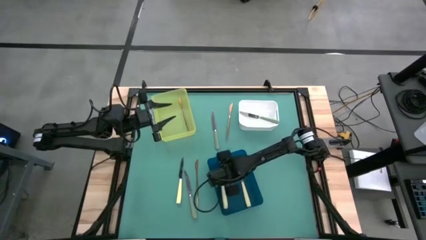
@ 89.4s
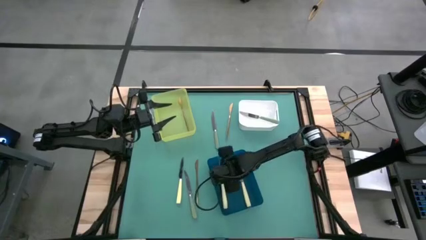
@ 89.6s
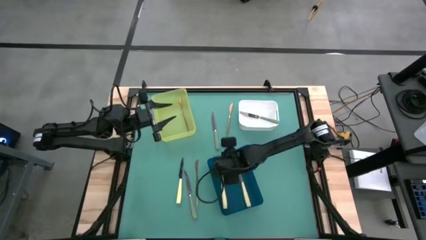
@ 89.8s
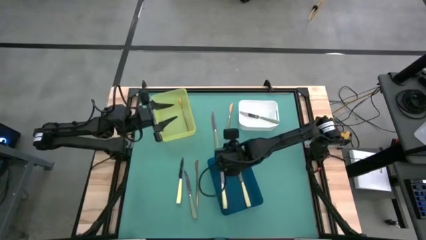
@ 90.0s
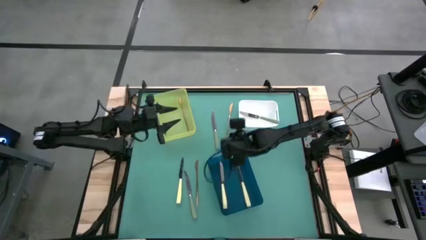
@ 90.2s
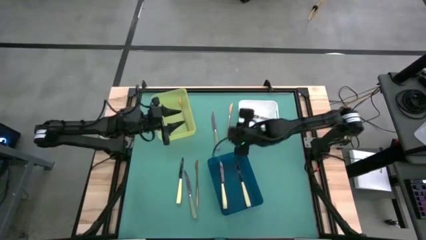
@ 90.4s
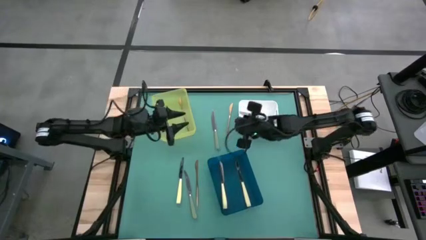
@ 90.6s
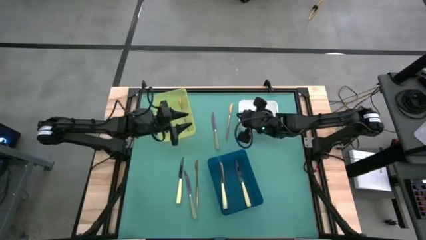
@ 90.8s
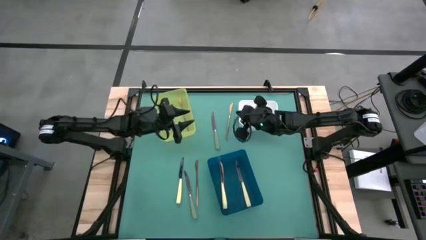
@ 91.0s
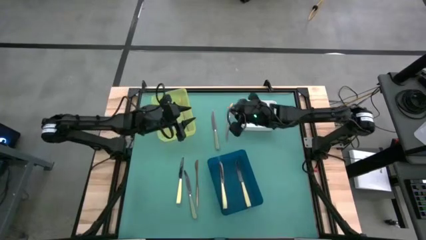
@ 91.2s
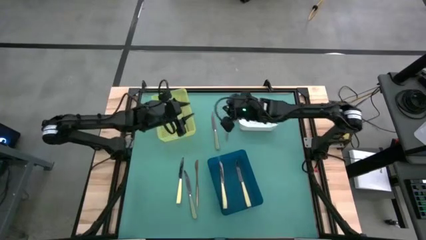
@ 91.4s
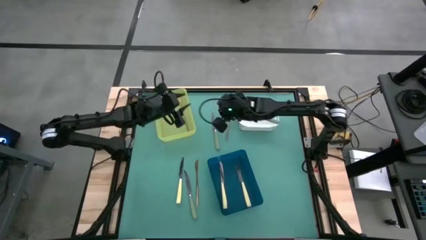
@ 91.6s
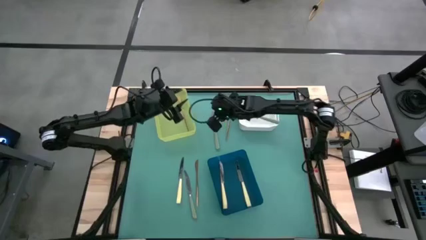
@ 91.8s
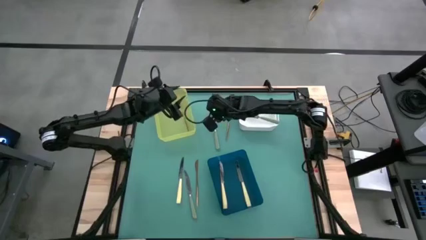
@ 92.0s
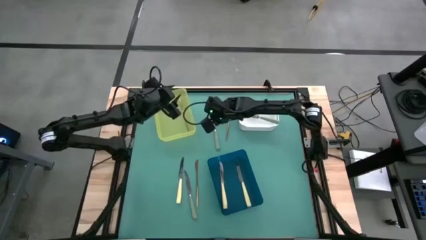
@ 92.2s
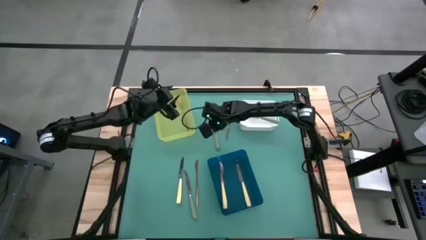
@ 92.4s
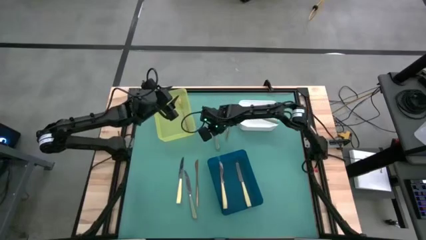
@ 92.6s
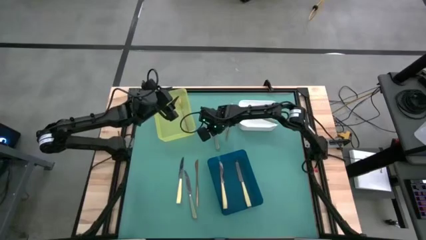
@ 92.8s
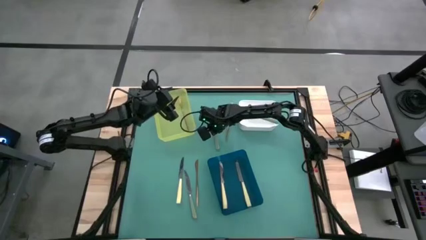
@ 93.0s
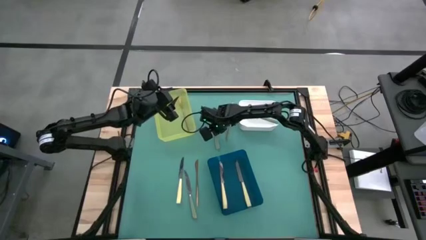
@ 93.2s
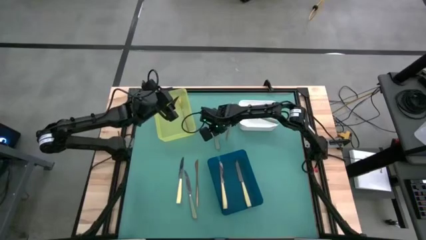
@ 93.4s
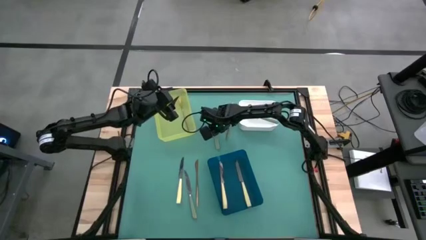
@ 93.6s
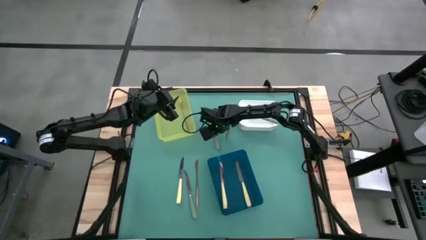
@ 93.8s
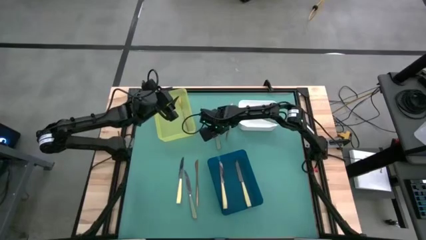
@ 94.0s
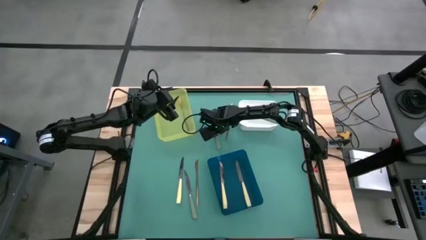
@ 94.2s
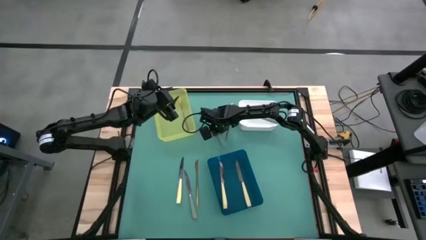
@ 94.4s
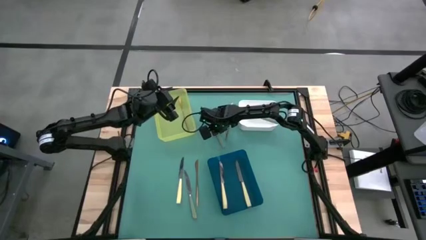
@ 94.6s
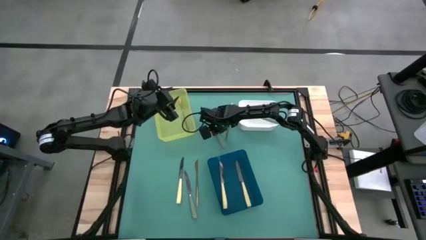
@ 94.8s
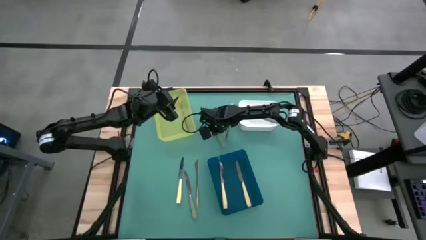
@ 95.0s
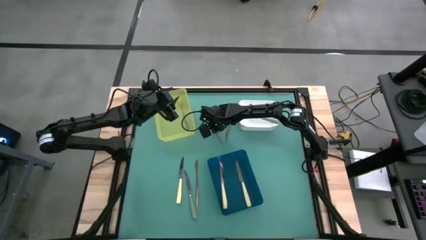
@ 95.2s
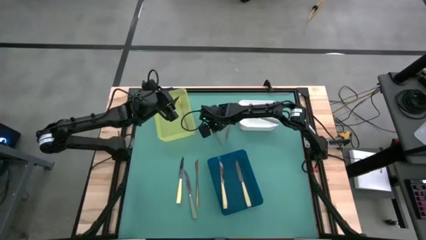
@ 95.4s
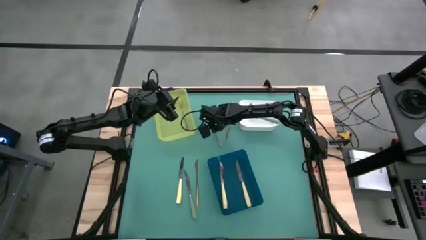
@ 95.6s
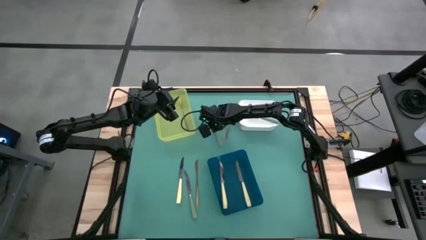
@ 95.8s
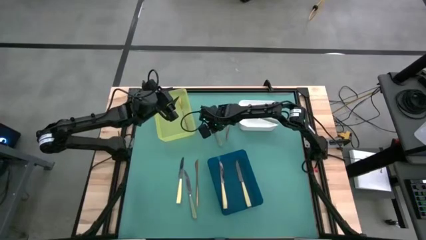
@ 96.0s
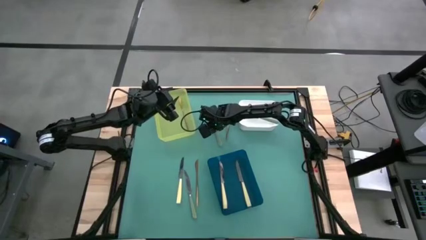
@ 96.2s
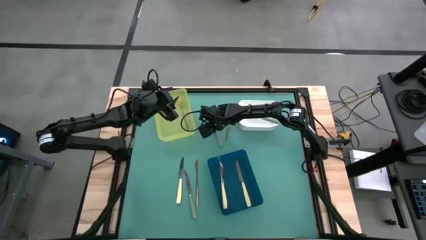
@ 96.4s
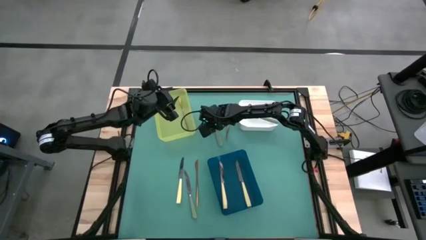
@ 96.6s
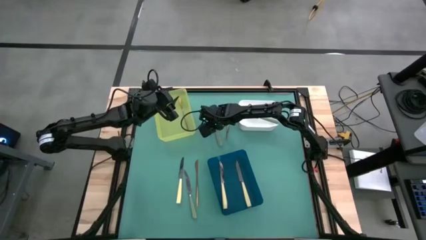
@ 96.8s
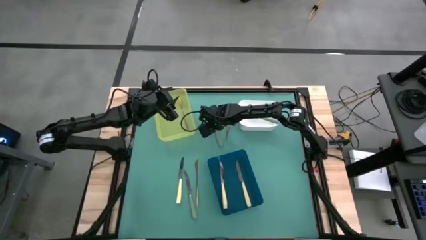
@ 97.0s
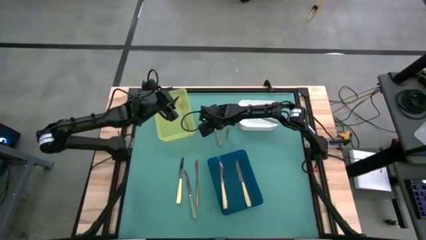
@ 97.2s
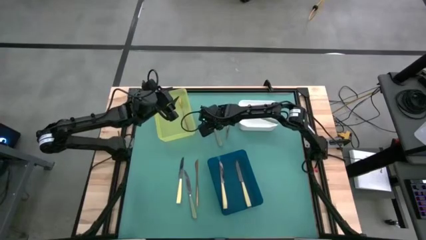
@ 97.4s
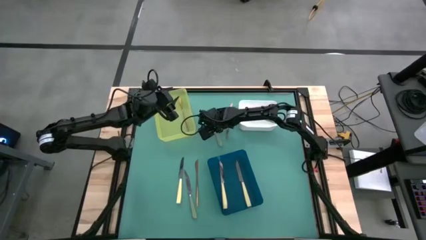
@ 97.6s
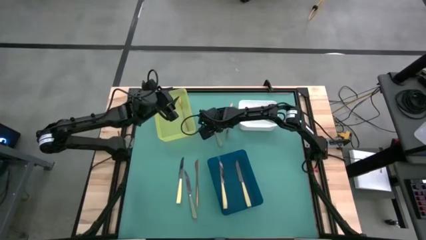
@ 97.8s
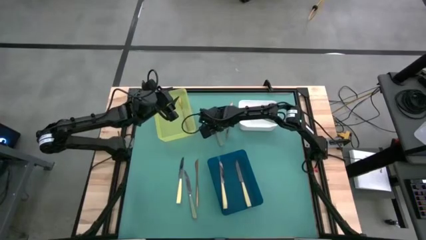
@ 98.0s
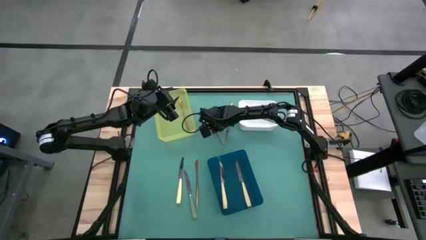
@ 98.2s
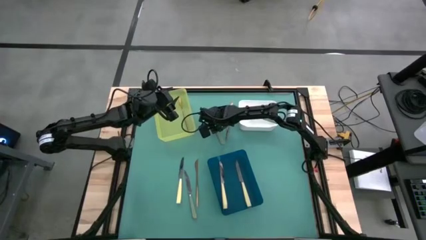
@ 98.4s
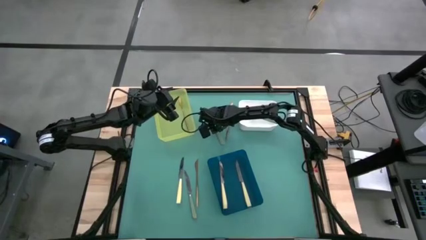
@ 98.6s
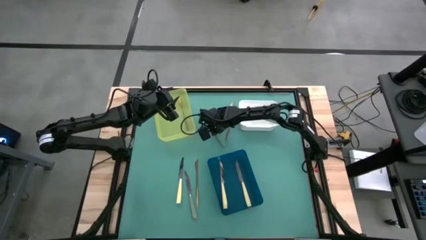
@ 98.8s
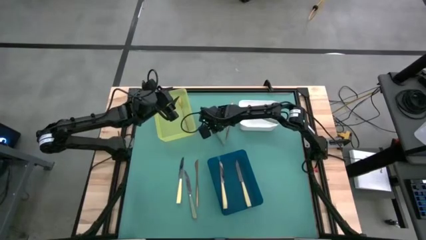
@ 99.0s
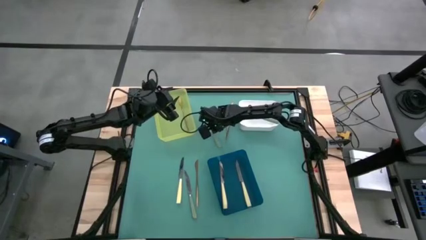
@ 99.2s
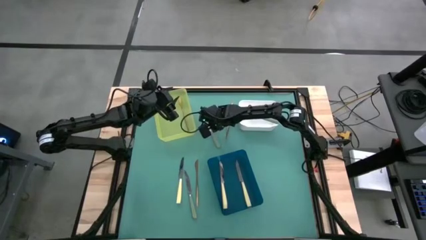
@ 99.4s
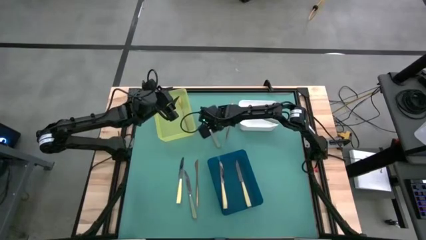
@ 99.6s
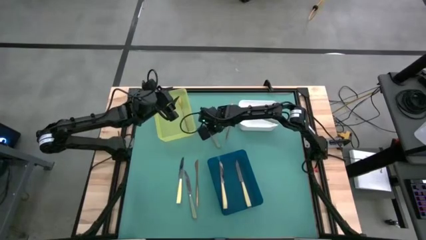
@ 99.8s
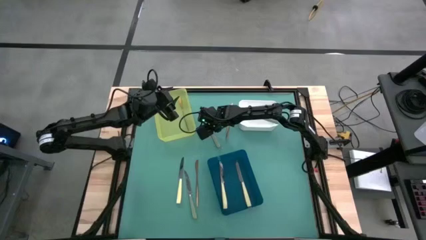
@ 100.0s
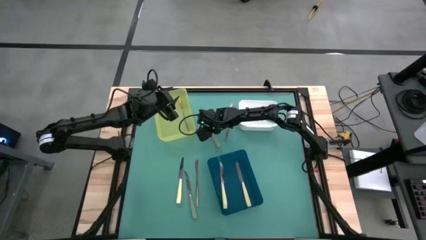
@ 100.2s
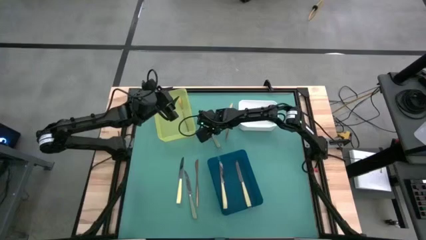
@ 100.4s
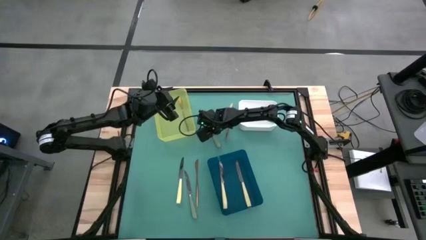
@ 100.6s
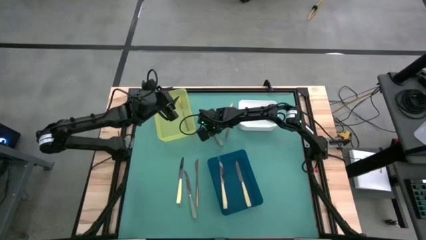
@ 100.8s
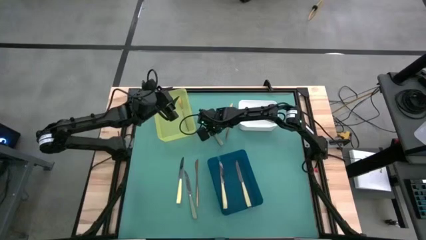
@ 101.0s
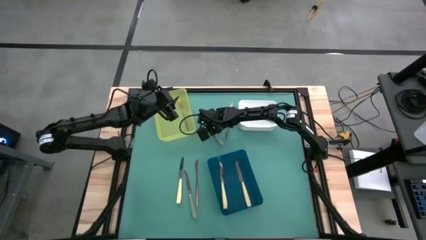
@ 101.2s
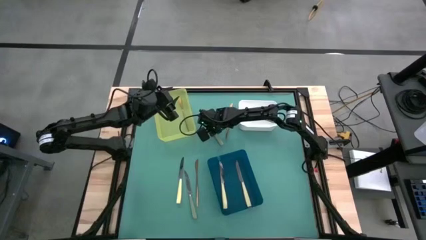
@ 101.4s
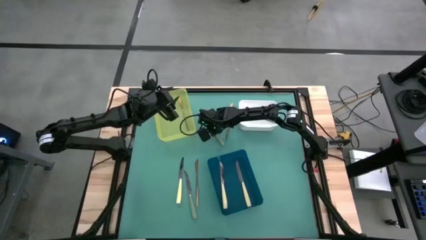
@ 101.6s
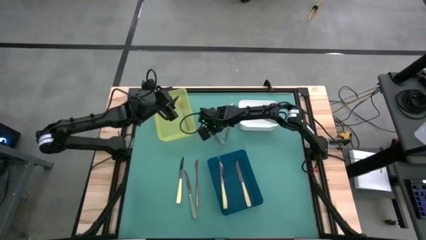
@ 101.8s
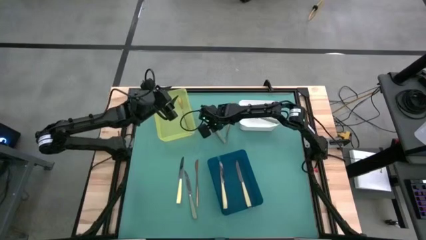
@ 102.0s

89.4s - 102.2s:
Task: Sort silverware by color (type)
Put the top green knife into the white bin
